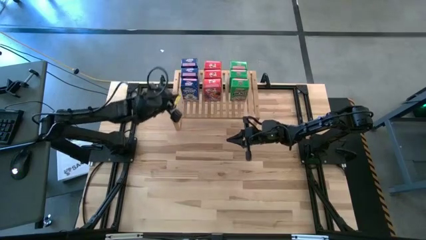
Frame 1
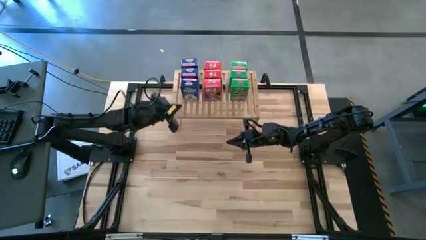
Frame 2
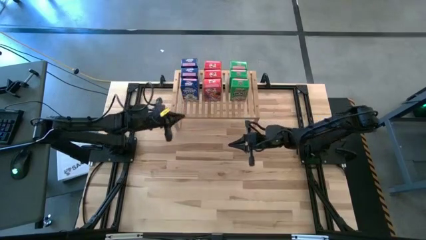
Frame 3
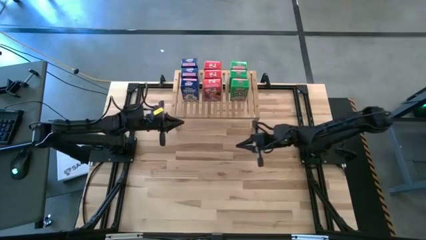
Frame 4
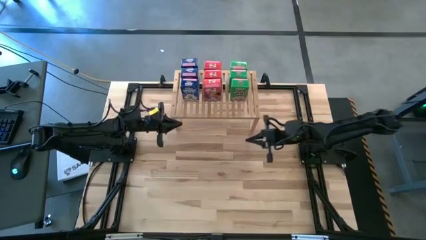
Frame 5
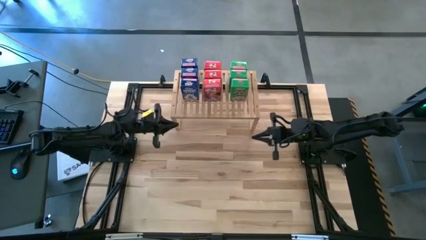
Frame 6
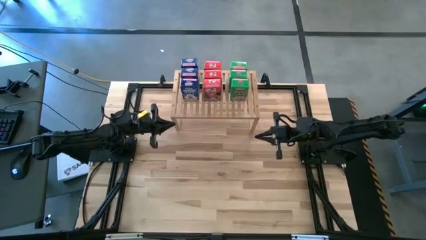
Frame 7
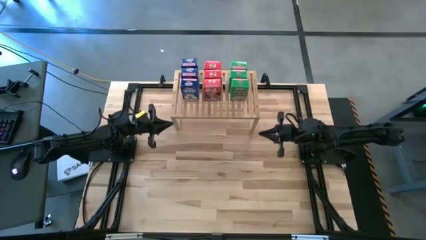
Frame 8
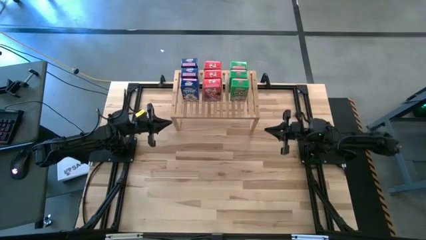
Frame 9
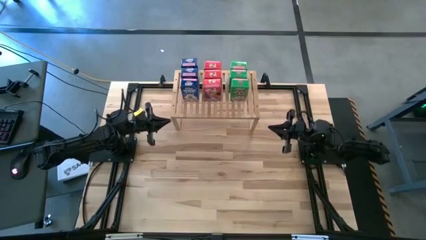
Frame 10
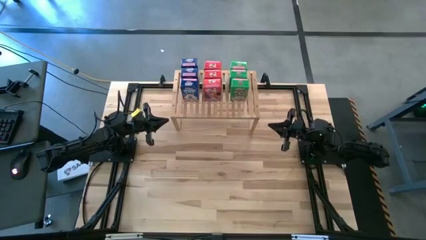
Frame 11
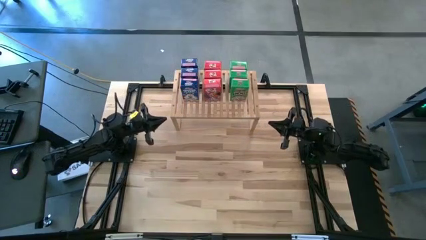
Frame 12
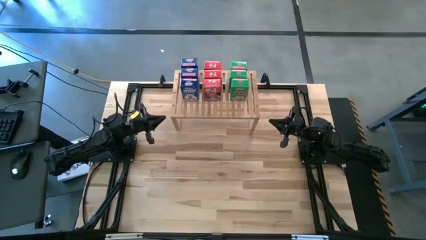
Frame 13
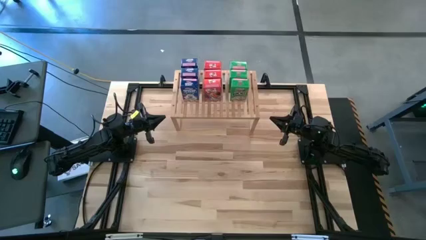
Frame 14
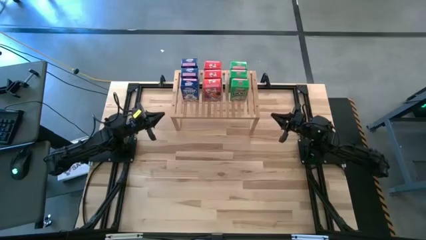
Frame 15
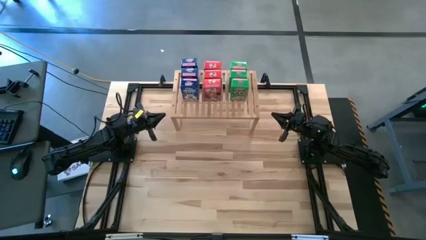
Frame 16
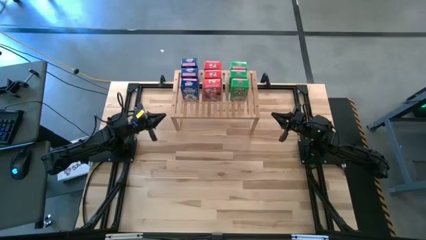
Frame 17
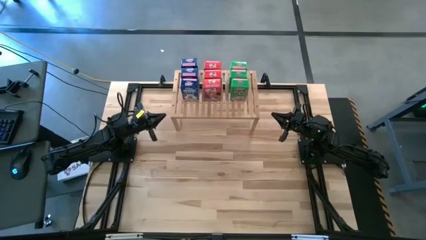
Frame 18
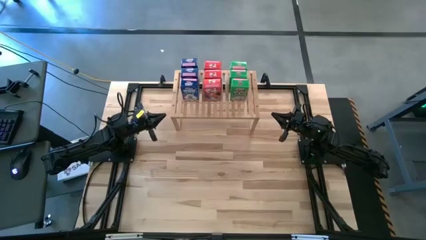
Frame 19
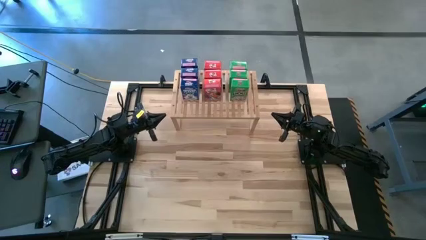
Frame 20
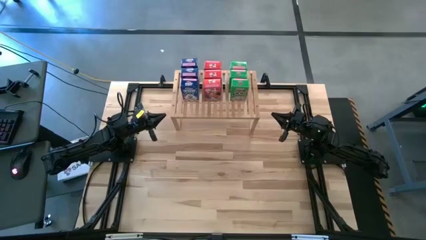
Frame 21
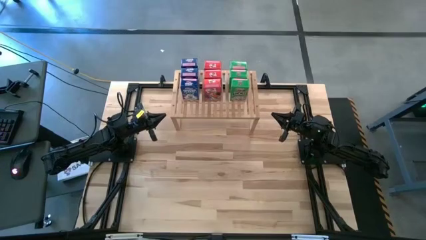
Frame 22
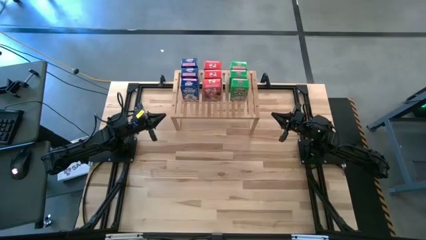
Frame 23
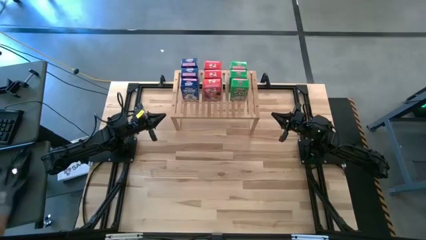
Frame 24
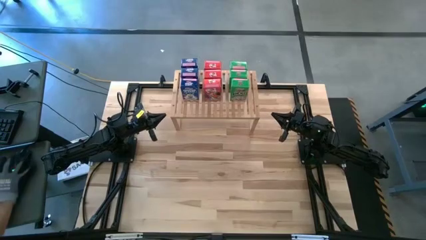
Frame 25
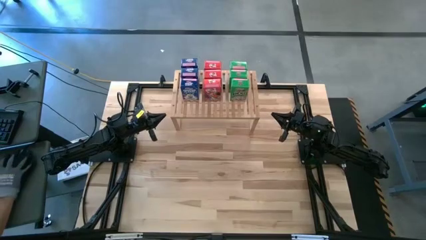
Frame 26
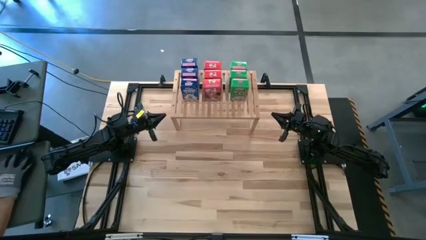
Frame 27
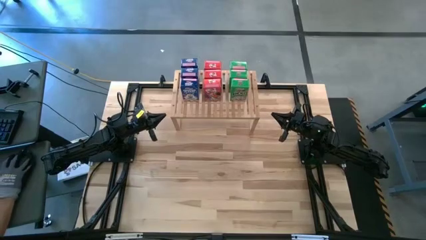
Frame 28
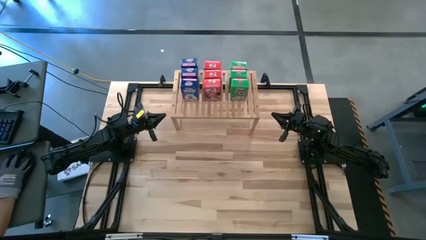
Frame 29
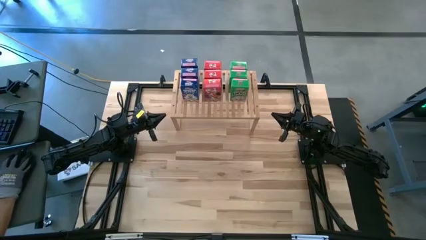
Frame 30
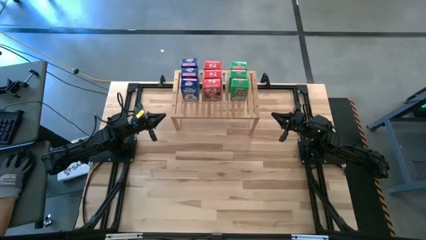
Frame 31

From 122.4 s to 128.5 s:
Task: Stack cereal on shelf
Return to Home Position

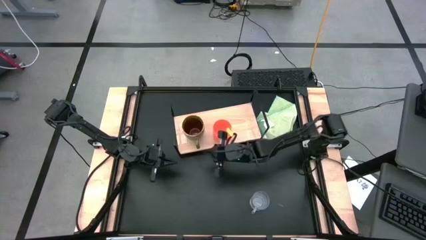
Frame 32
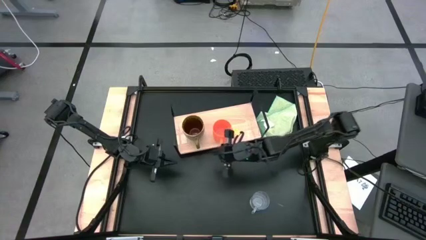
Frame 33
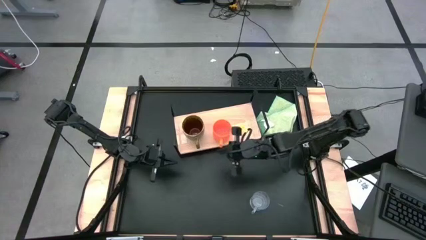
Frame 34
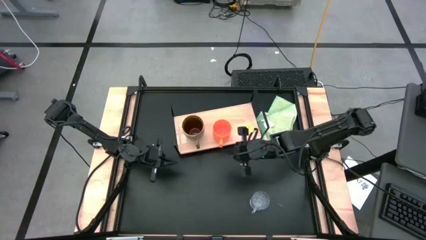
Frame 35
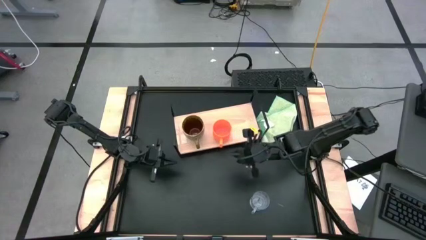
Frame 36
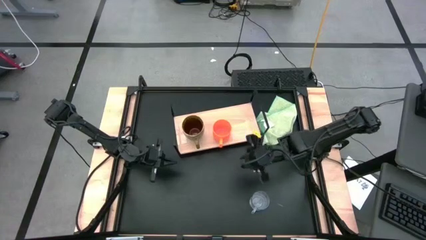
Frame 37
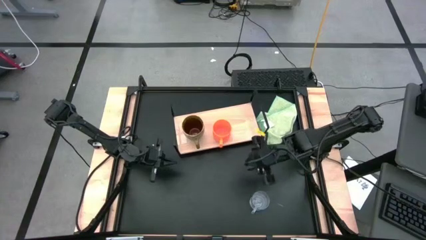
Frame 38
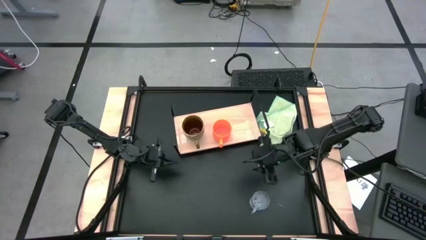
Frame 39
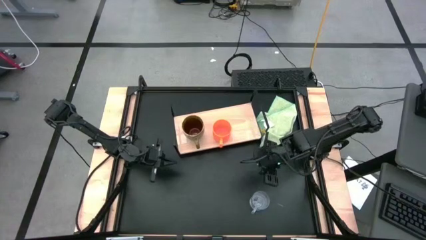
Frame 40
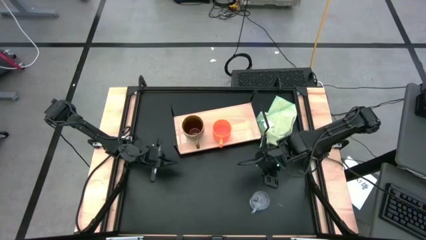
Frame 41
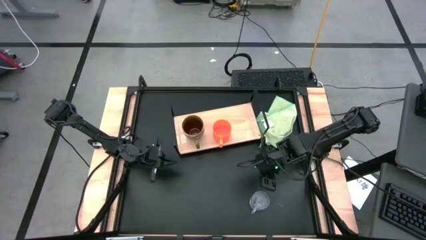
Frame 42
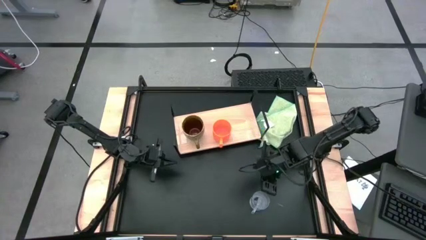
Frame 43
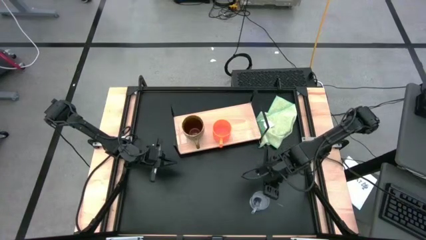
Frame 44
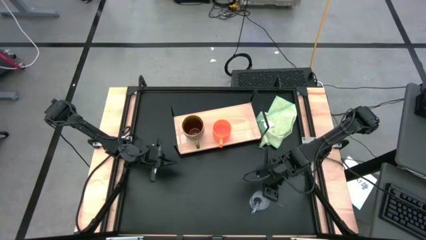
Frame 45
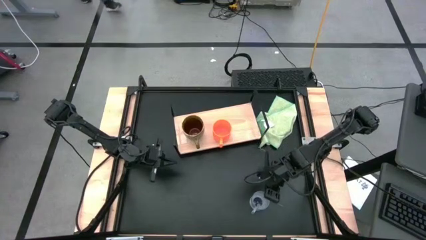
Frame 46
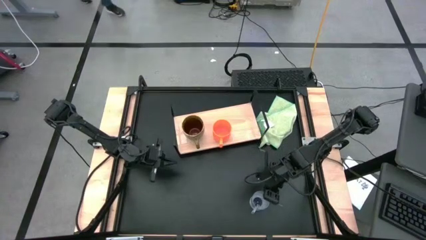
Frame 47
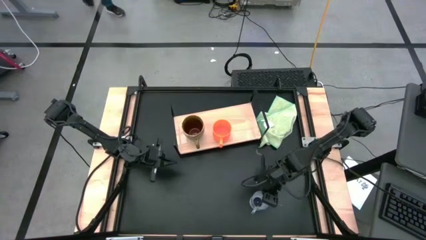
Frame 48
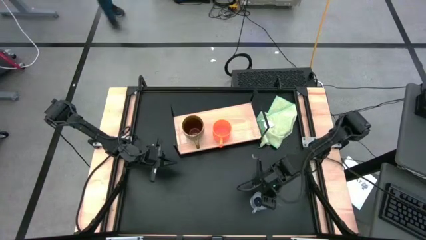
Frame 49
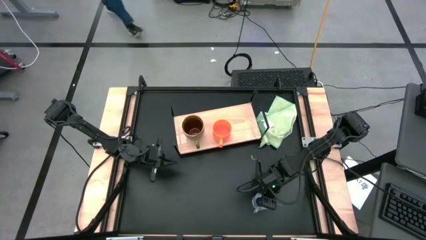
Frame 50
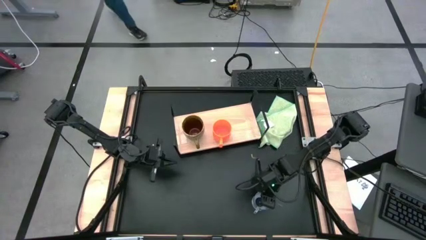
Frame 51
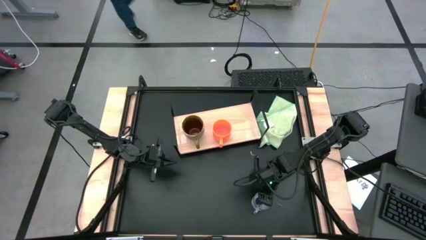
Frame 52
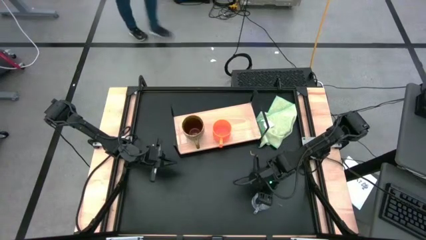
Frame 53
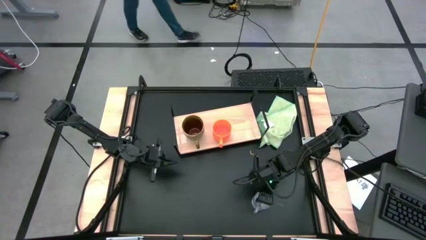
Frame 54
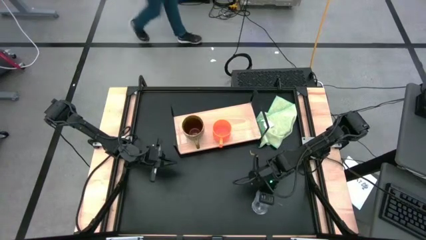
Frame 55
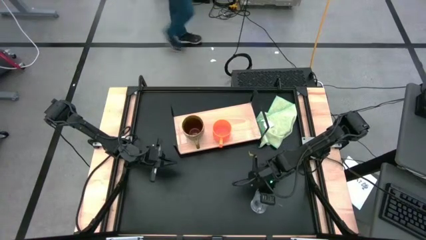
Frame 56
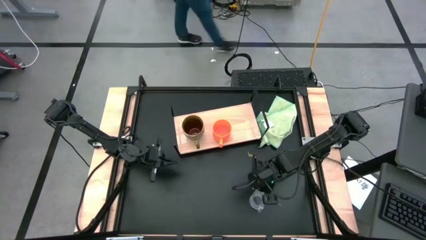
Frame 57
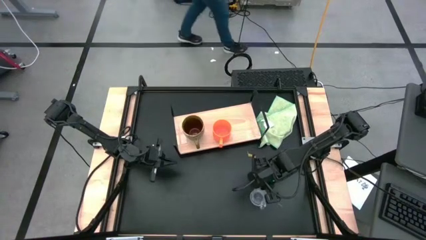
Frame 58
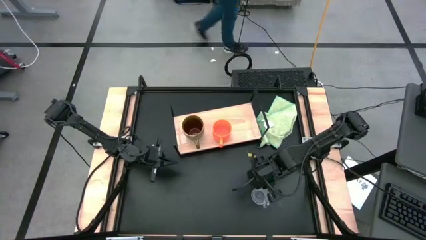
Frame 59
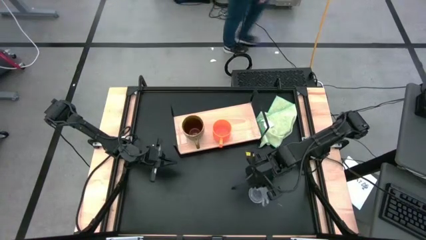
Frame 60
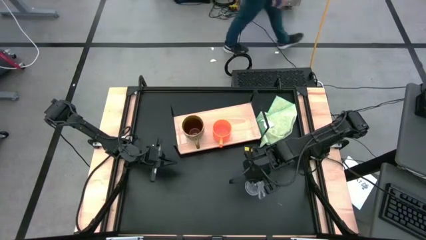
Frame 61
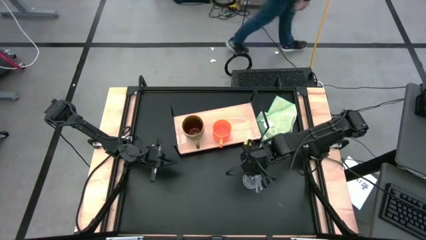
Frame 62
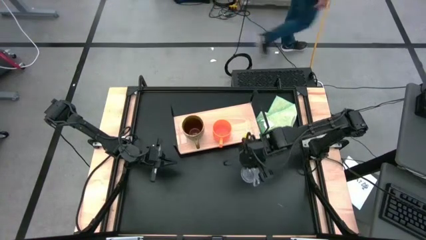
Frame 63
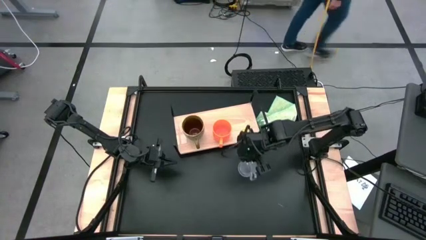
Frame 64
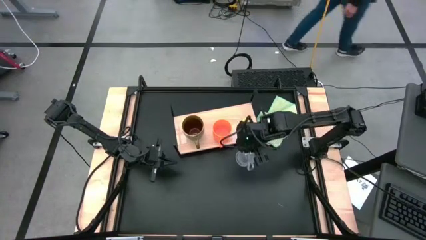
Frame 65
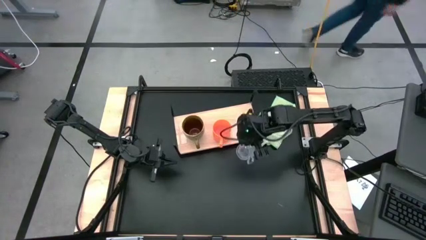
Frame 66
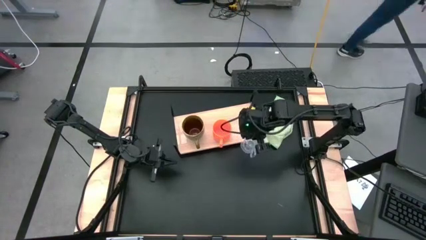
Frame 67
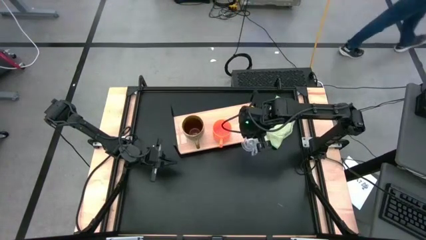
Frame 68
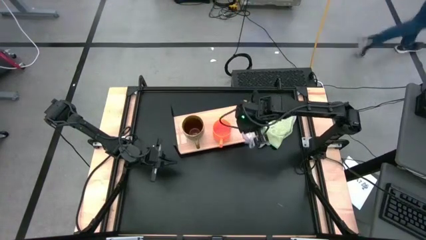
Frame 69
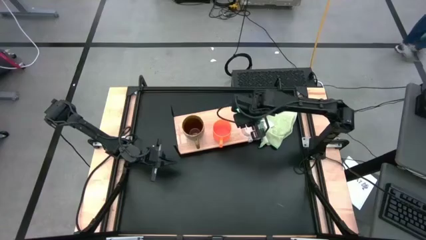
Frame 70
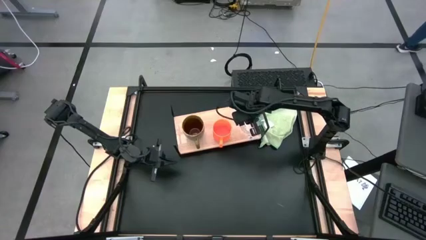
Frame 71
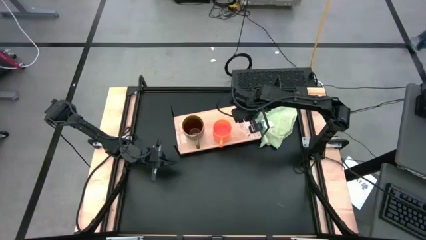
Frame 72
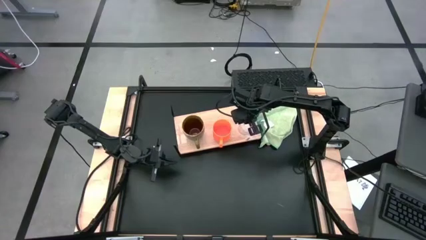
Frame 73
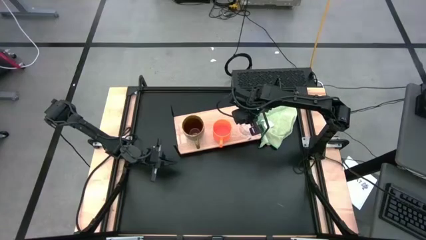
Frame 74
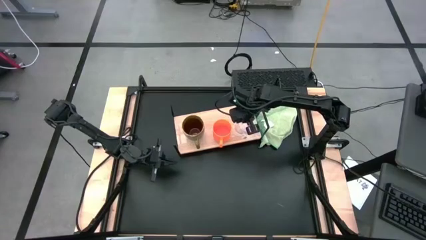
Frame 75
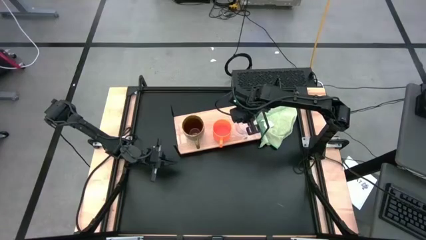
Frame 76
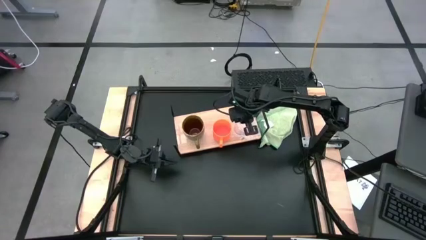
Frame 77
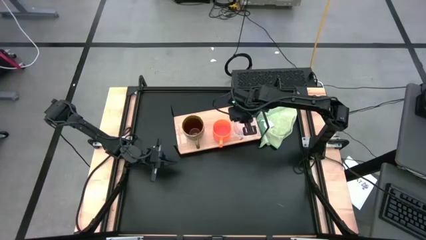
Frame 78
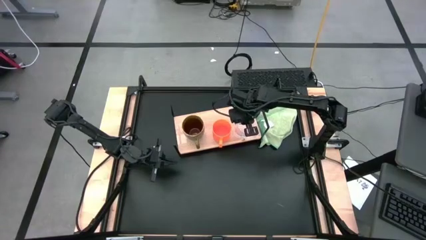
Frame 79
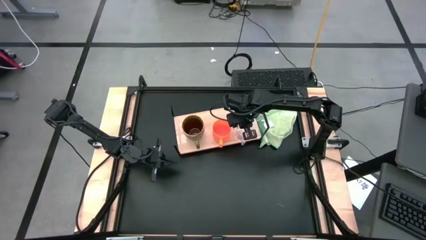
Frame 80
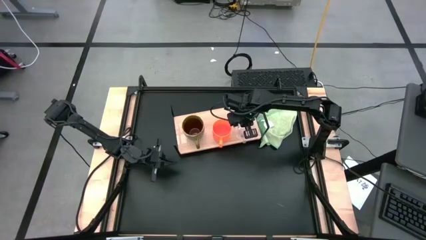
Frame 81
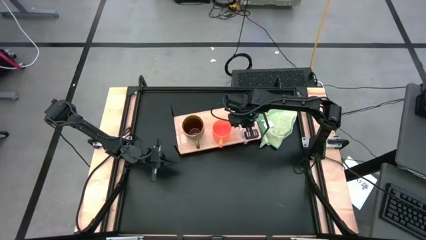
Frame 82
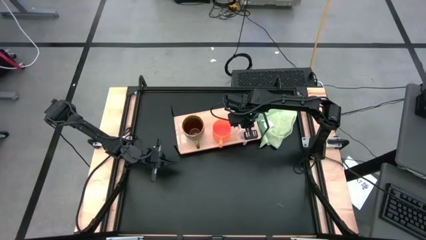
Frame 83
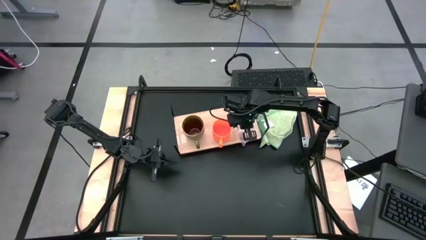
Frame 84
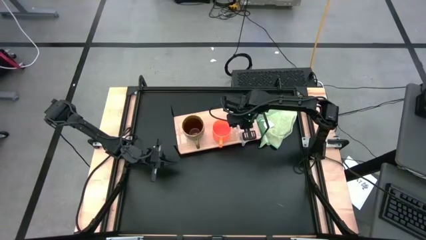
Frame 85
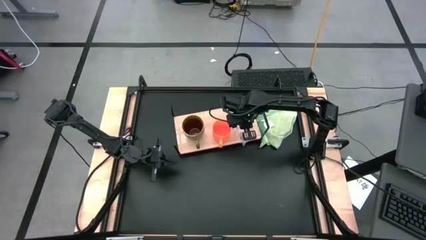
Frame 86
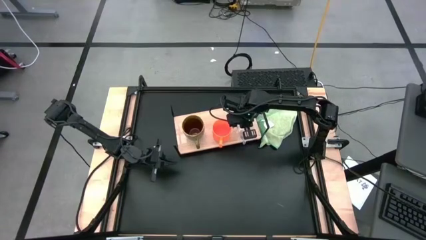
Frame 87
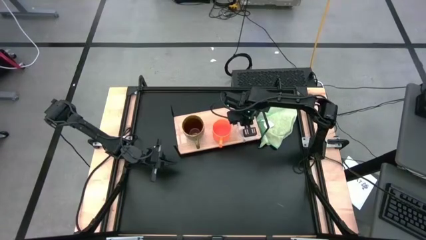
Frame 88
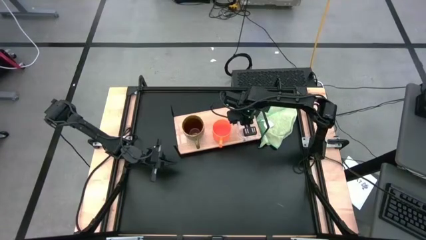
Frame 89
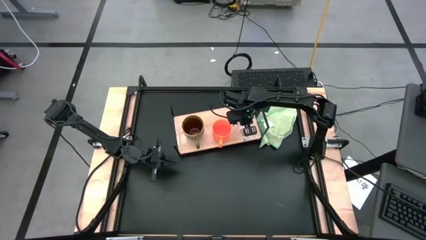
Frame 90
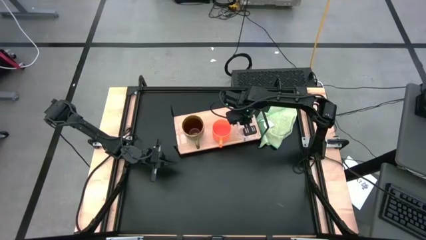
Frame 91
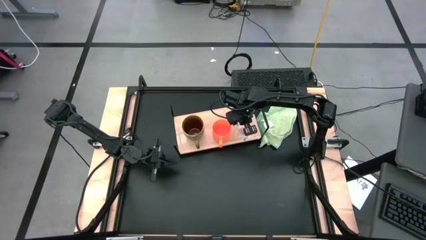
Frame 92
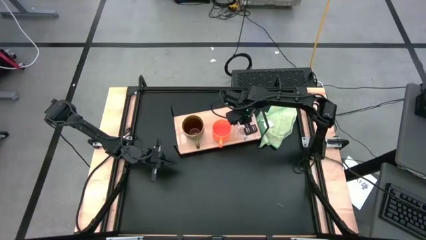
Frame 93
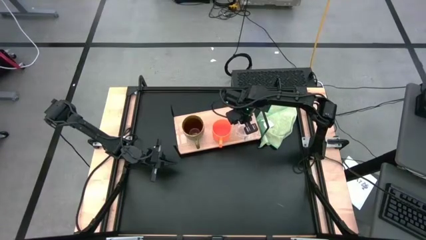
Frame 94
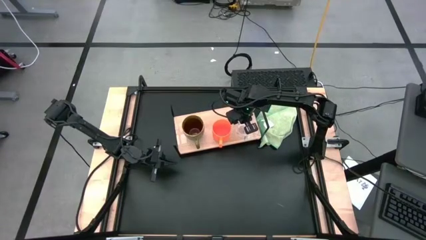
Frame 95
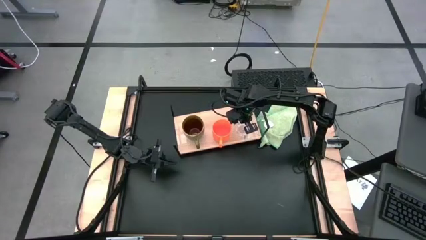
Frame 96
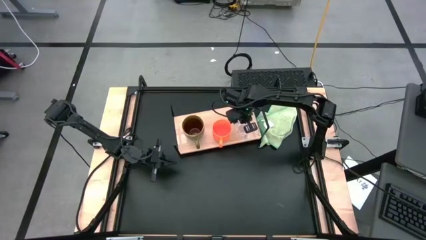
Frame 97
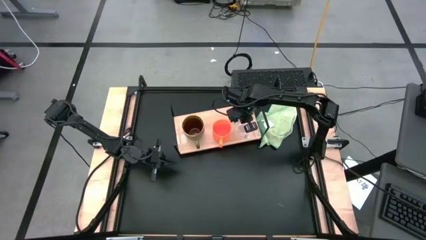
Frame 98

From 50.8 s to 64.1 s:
Task: Stack small to large cups/mugs on shelf
Put the transparent mug on the shelf
